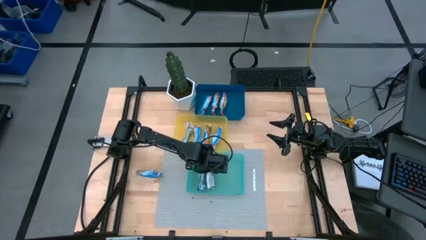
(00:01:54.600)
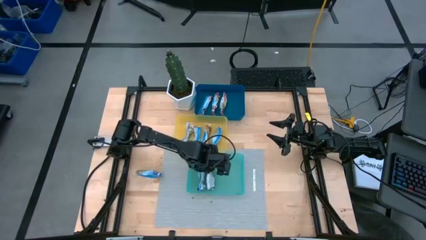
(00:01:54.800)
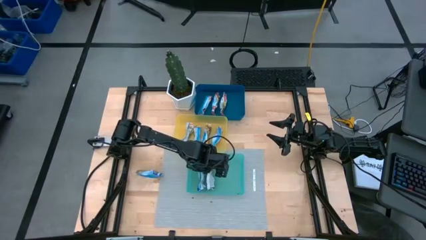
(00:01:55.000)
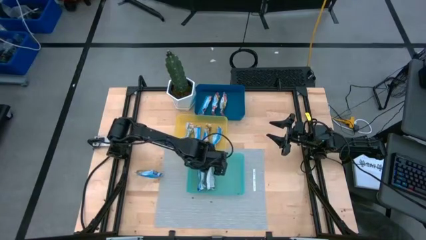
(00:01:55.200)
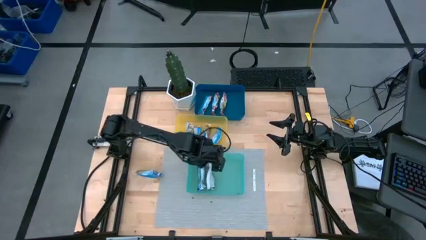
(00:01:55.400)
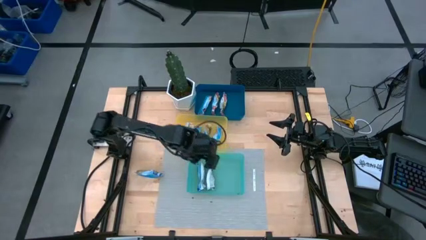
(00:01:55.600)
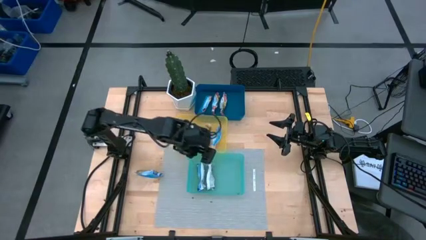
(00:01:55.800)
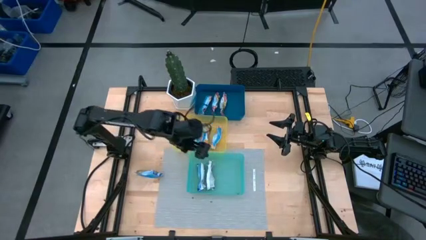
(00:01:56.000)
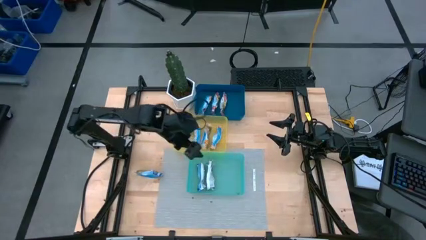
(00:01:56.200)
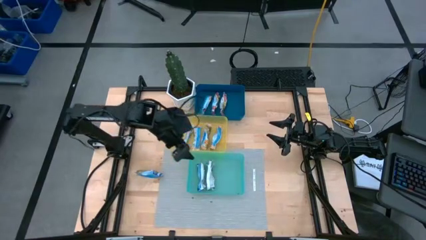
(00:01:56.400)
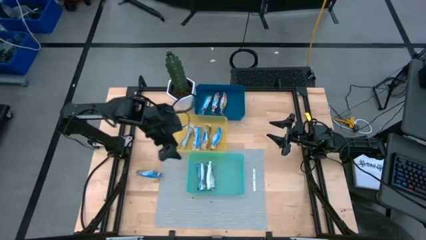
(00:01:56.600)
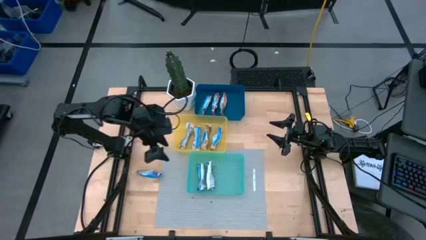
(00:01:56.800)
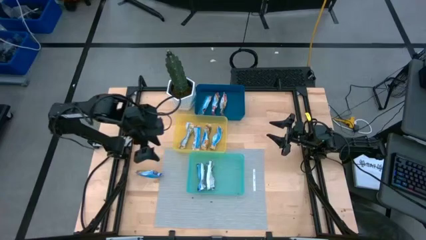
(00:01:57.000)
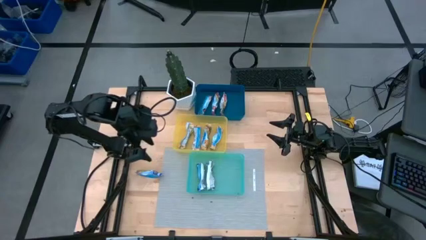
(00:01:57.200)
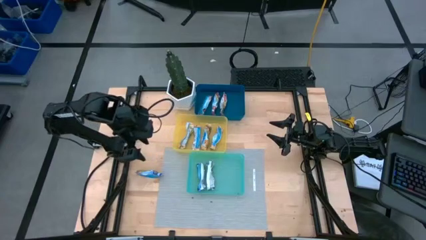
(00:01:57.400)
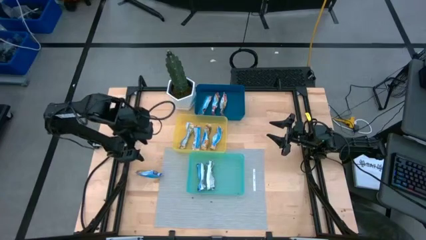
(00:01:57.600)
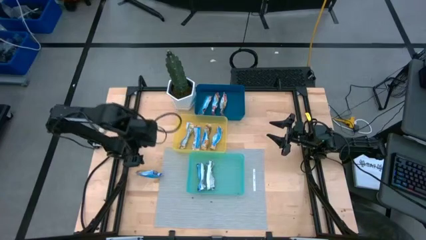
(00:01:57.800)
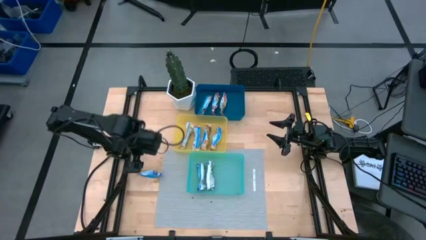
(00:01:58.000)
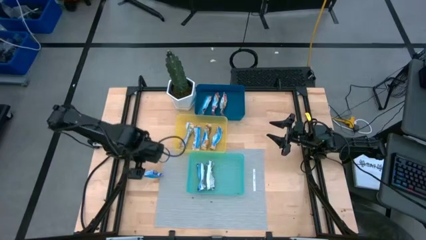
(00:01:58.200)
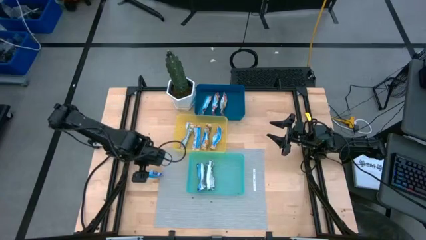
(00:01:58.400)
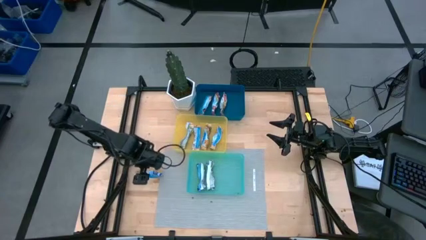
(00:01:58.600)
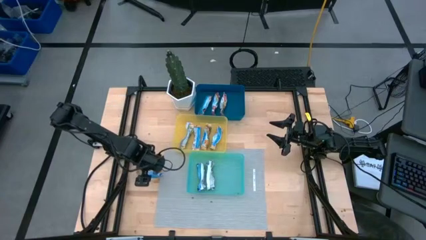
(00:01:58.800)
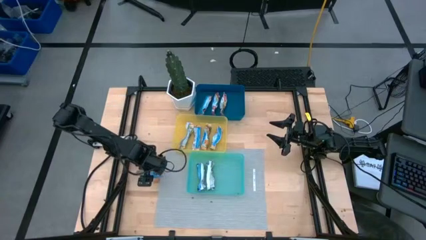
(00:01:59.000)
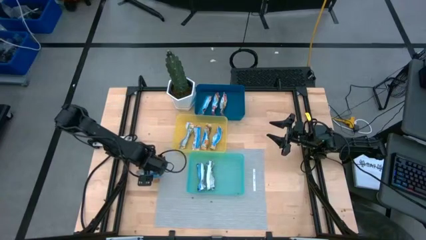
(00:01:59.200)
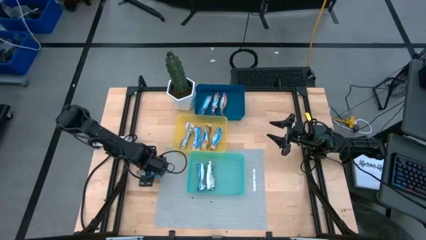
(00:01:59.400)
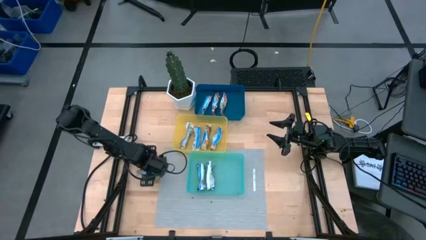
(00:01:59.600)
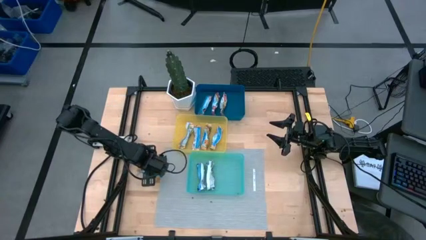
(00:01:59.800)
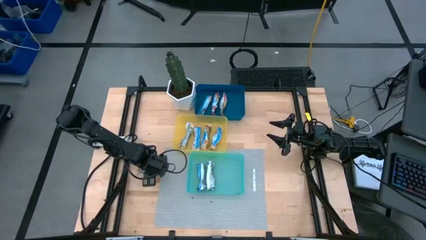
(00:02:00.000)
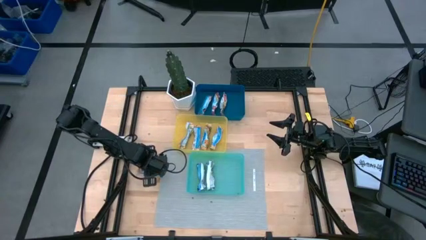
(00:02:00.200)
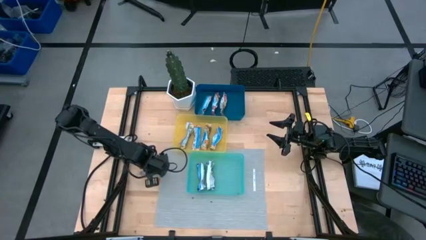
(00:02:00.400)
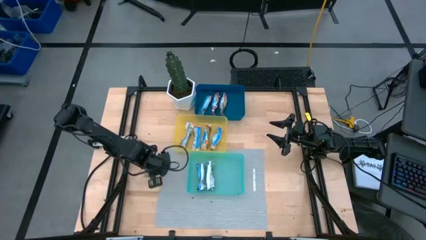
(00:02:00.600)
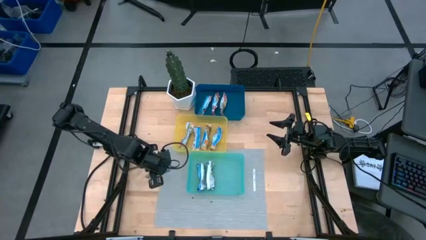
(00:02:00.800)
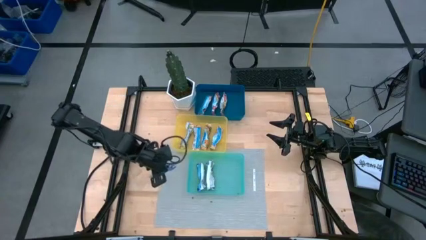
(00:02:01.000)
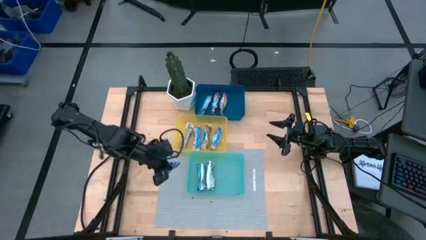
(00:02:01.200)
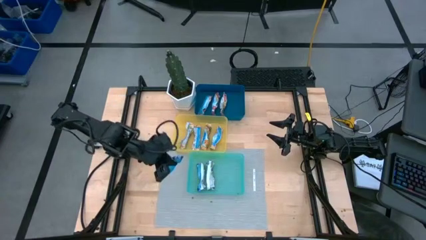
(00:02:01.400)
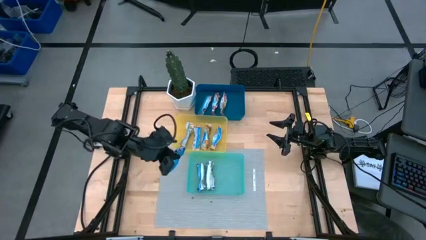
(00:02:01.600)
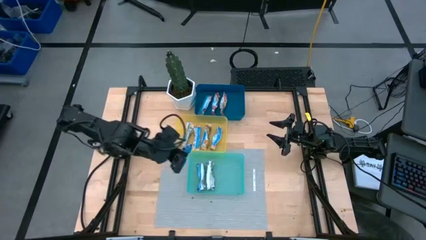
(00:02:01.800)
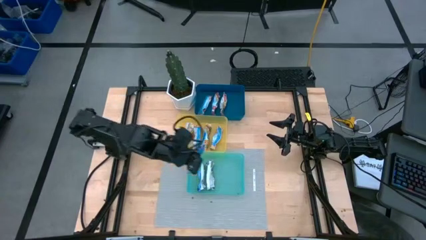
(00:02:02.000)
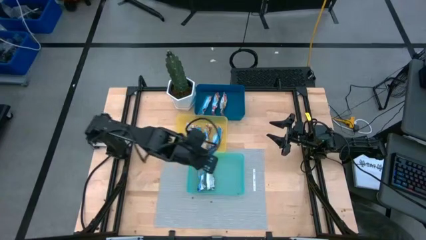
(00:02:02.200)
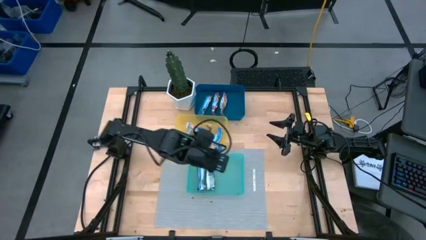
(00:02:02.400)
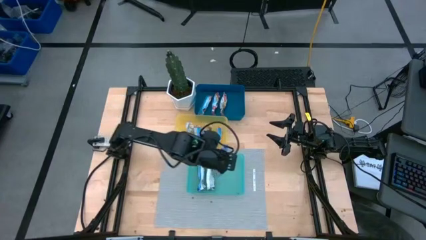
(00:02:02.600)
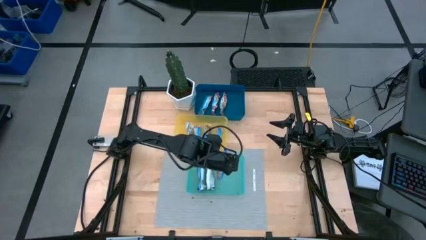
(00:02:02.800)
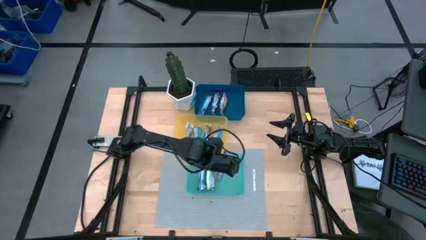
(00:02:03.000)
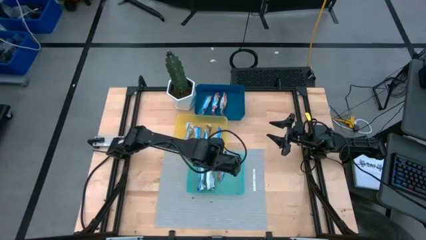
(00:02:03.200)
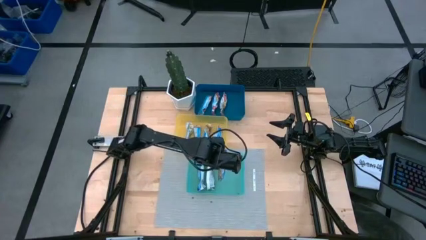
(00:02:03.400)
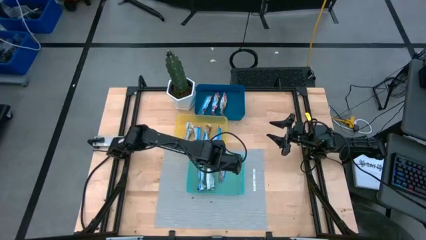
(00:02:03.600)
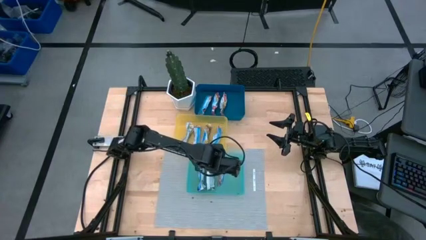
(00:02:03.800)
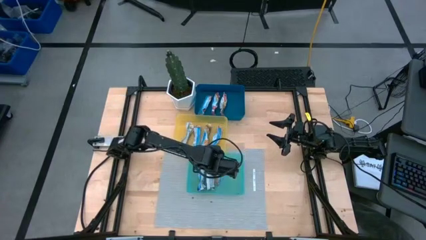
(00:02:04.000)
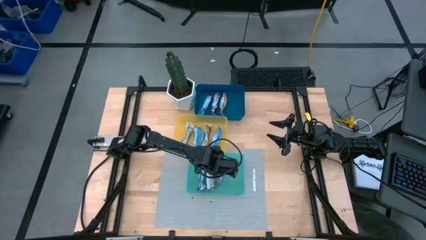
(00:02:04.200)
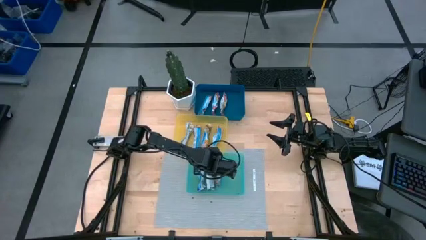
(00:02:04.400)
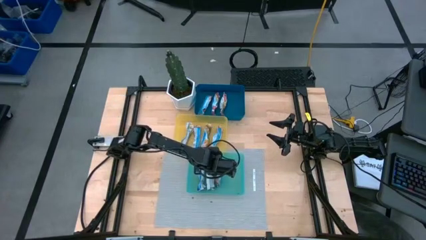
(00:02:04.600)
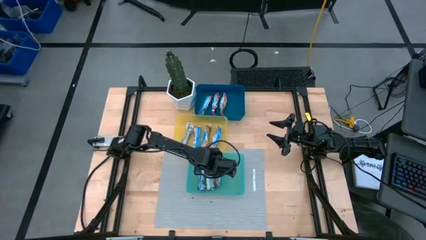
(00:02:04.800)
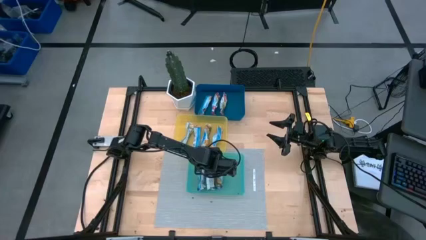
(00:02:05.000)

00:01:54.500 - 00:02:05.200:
Task: Pick and place Granola Bars by type
Put the blue granola bar into the green bin

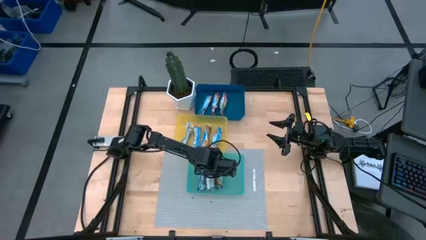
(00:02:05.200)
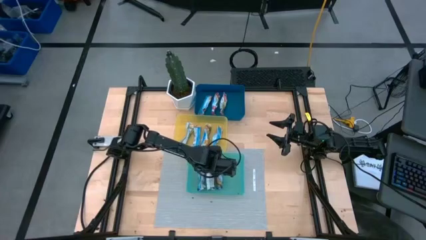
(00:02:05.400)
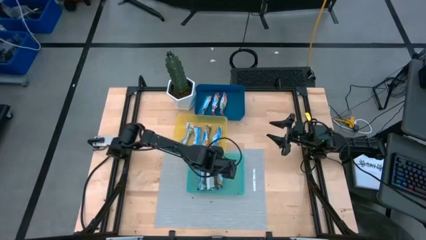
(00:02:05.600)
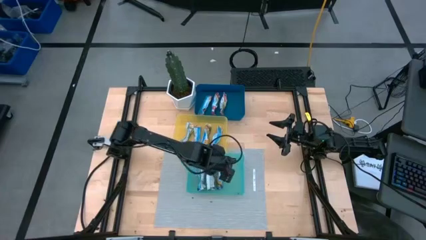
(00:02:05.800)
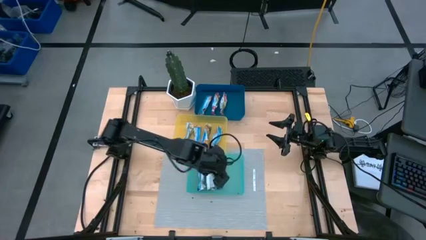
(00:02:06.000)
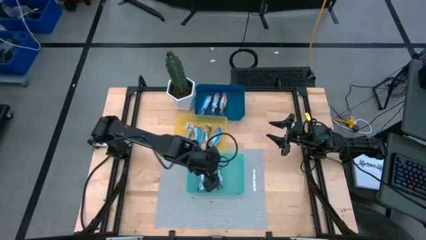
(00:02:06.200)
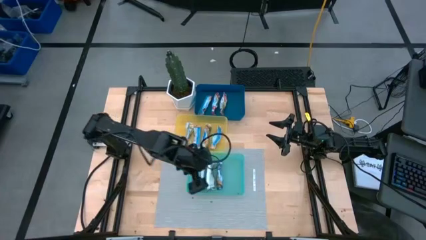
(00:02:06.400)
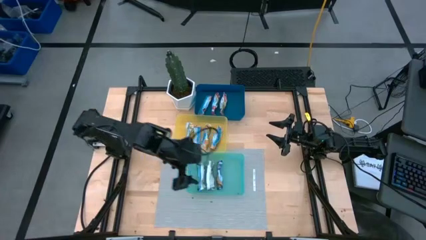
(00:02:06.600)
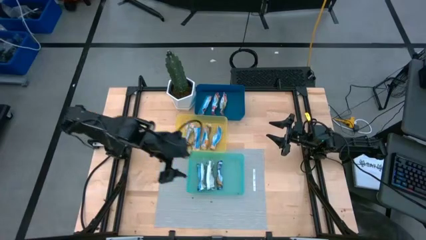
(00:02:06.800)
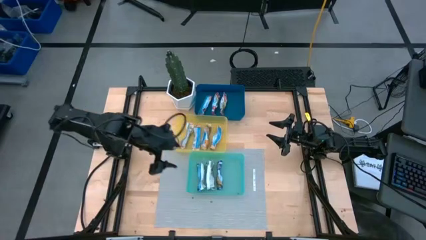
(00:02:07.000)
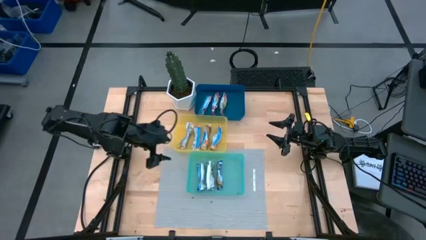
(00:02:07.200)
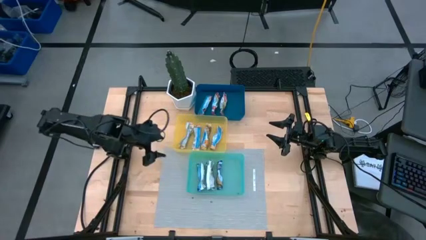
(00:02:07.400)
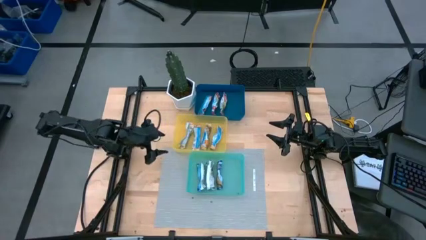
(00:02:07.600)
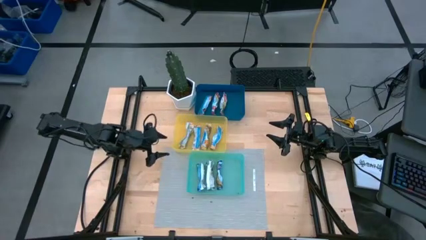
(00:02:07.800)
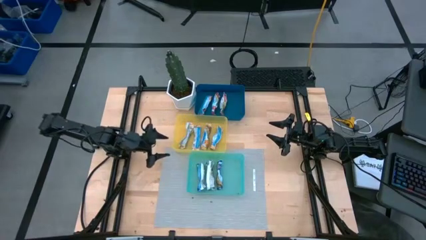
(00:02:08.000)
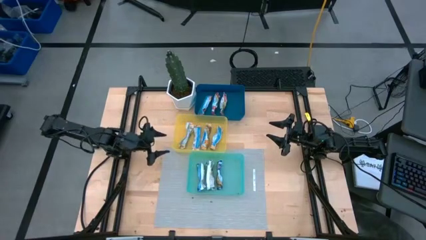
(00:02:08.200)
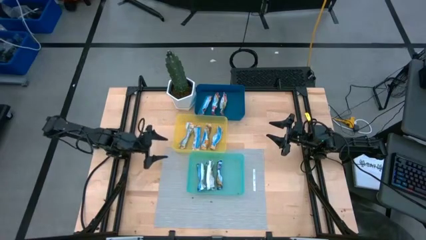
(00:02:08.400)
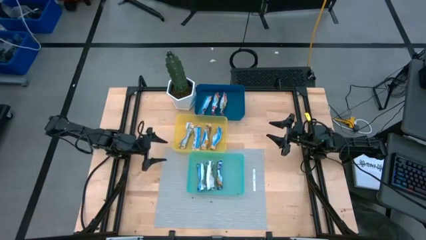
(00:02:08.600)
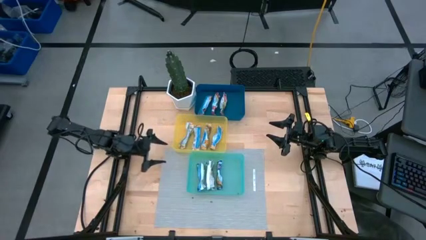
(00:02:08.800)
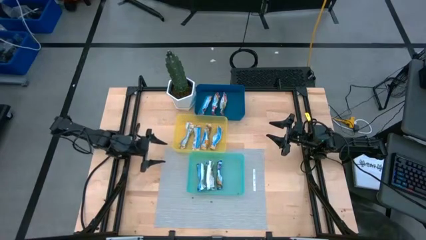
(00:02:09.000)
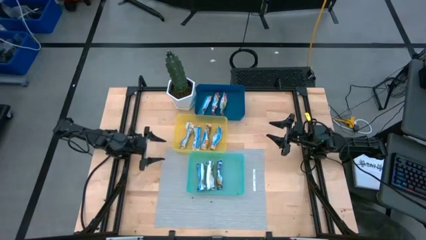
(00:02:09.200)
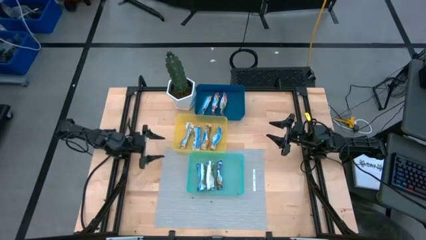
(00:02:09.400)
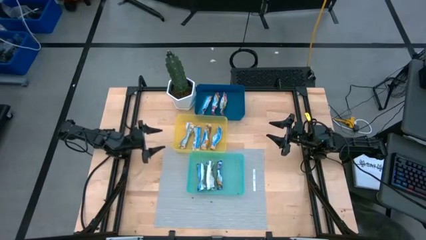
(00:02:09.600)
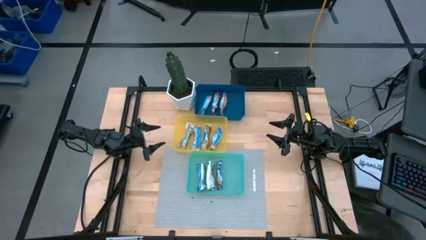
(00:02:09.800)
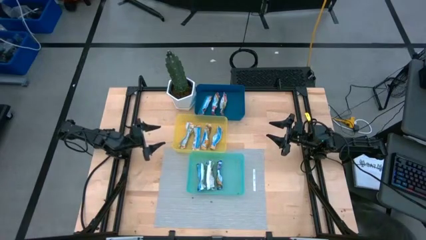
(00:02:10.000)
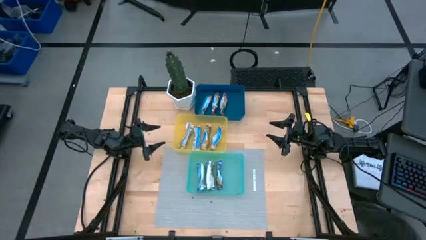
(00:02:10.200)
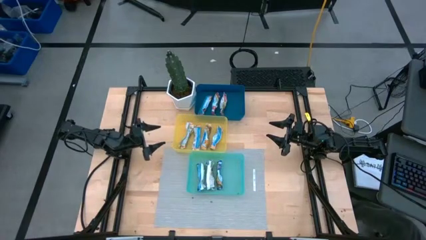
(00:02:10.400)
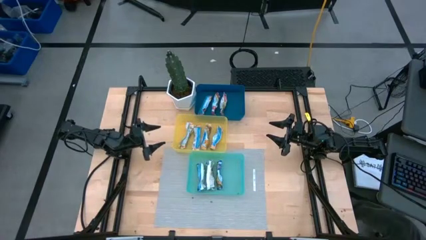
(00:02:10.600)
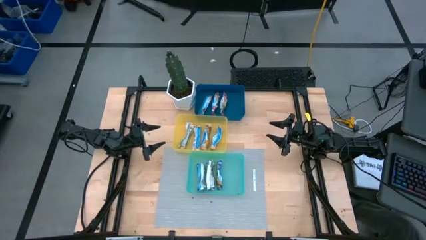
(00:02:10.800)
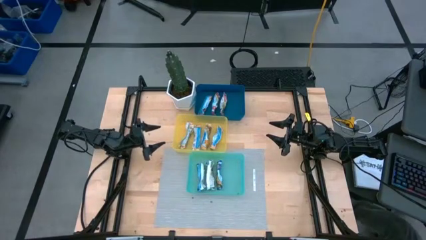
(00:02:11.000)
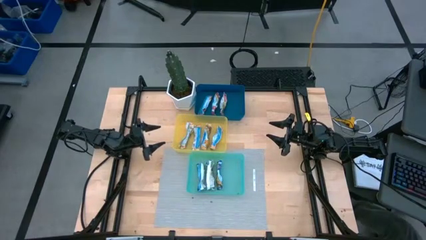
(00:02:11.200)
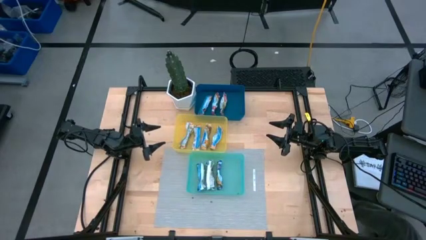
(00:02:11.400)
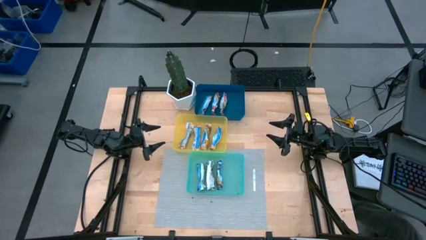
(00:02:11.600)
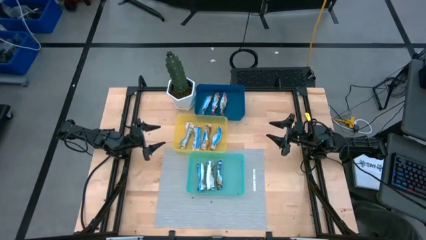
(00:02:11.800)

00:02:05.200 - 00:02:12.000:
Return to Home Position
